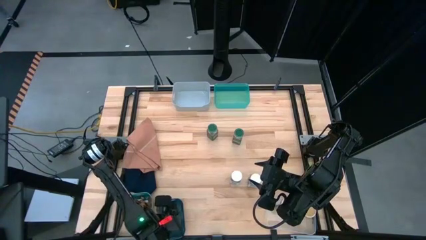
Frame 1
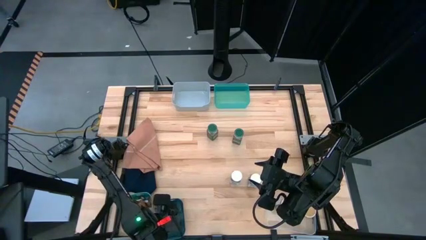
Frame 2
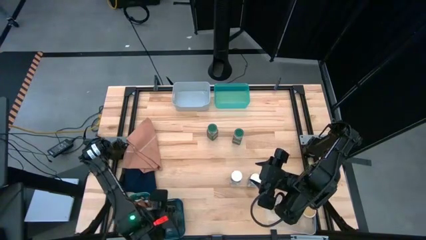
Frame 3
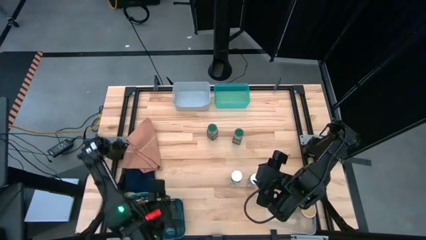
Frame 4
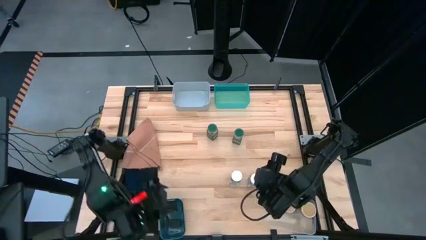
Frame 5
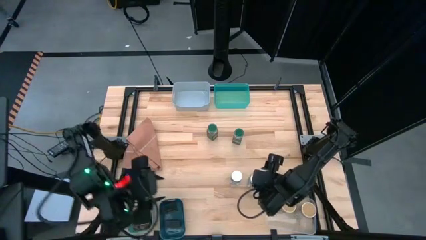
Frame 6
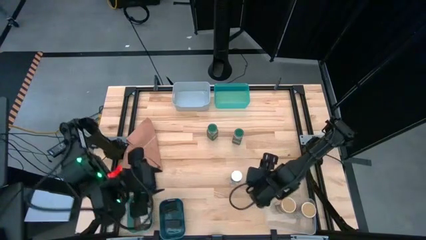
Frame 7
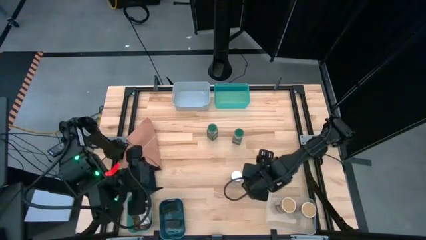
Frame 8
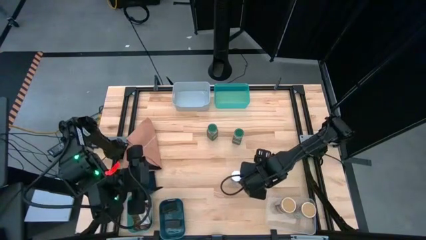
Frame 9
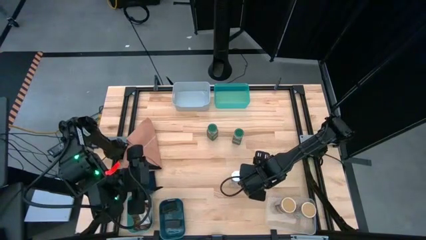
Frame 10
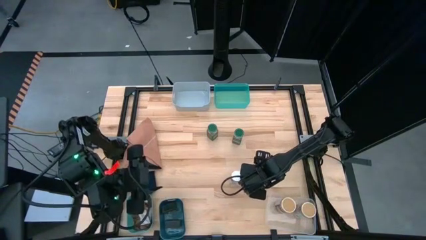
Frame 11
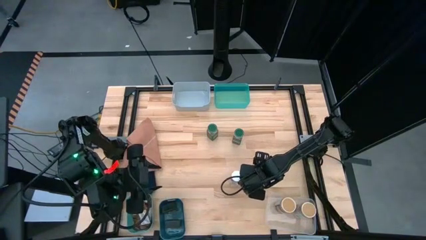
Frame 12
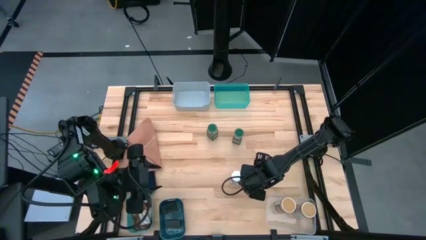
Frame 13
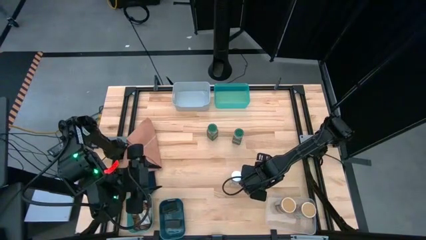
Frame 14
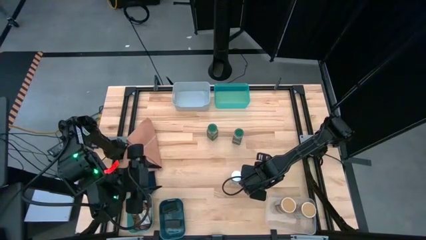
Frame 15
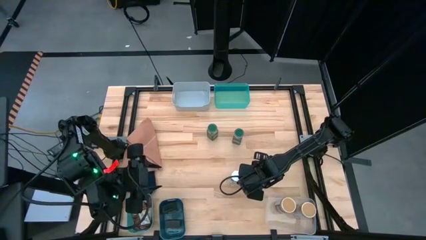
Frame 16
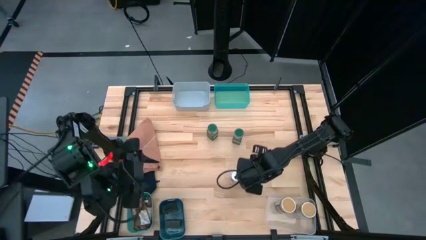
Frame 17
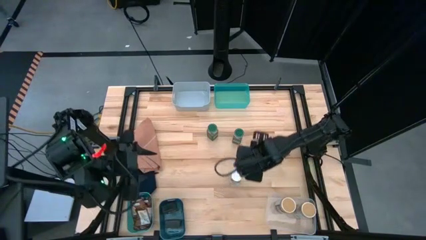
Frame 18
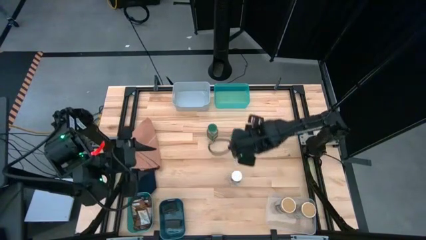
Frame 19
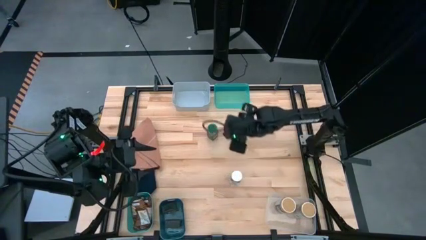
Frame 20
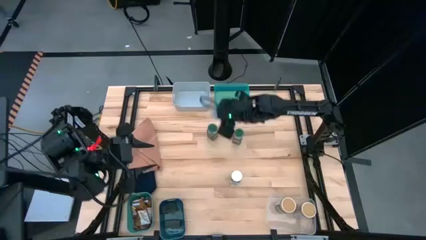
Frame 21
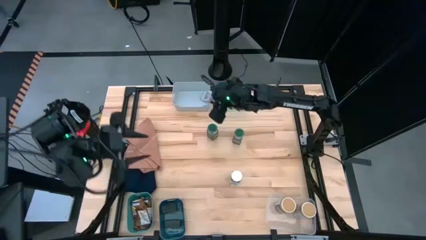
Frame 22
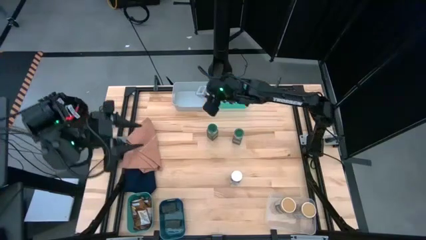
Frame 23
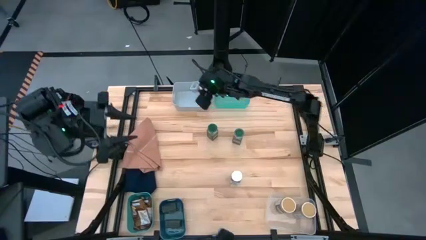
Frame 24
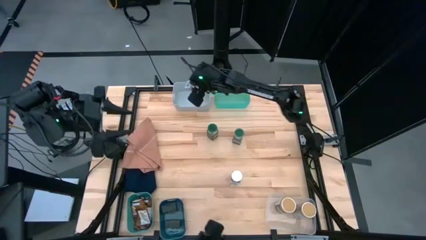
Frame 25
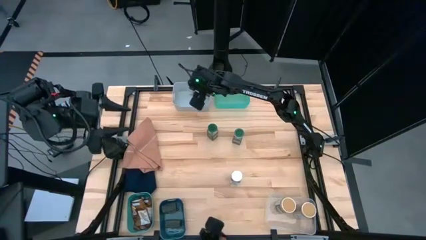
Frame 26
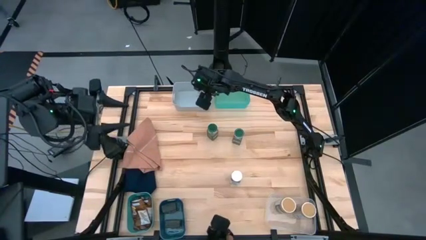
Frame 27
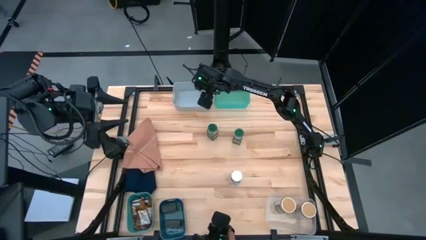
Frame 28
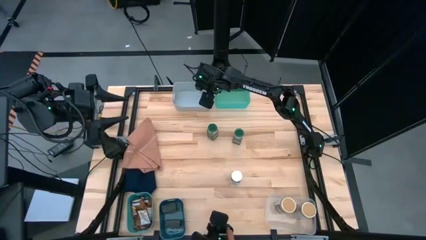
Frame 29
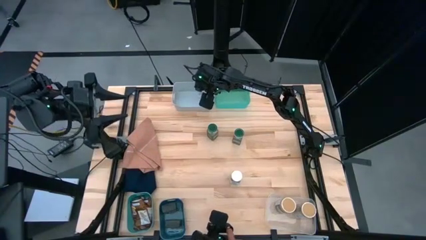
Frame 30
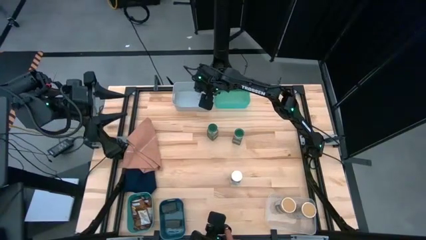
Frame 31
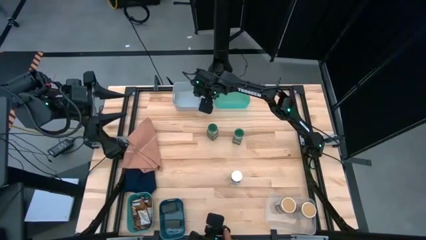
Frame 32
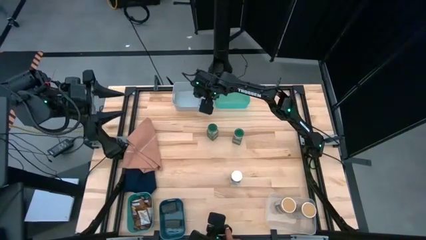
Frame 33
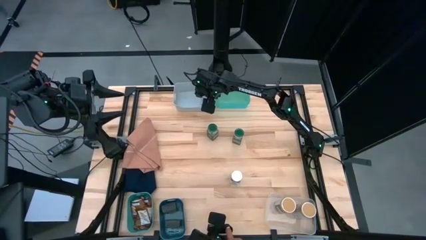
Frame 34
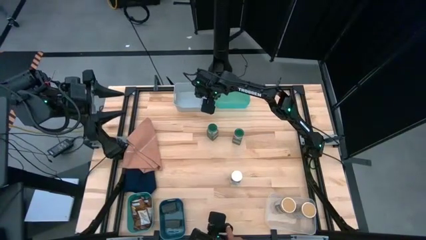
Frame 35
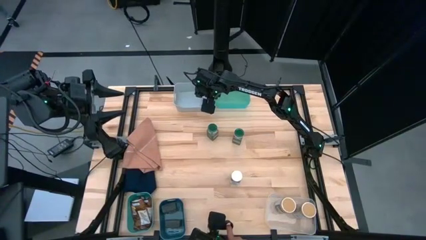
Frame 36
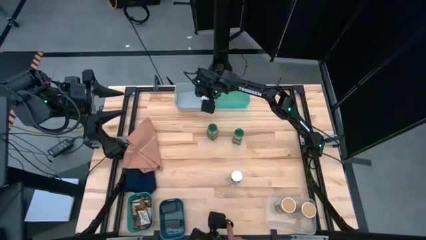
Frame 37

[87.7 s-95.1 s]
Task: Sort spices by type
Put the right white spice bottle into the gray bin

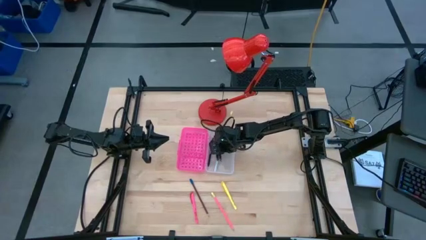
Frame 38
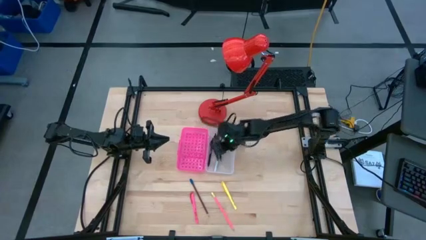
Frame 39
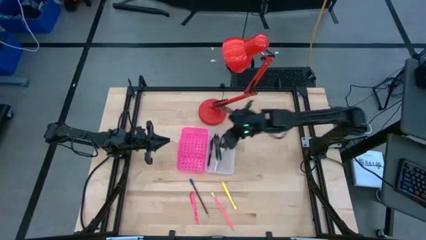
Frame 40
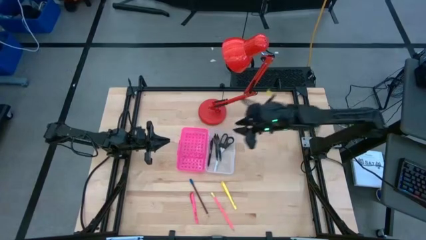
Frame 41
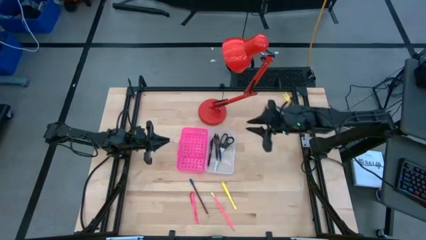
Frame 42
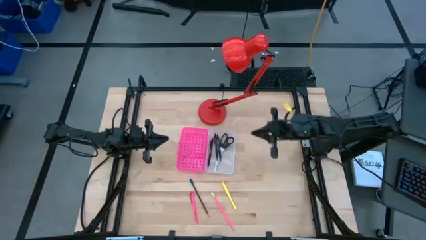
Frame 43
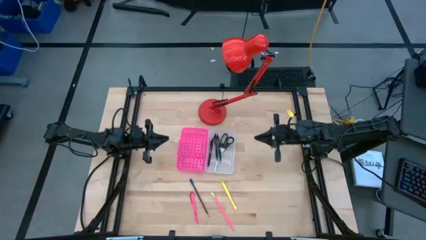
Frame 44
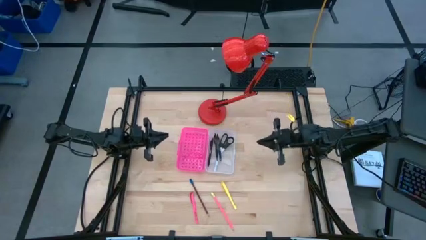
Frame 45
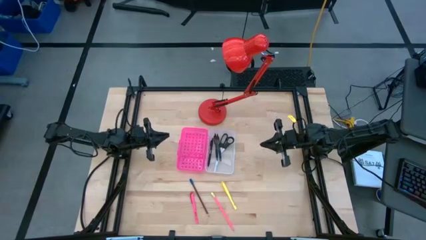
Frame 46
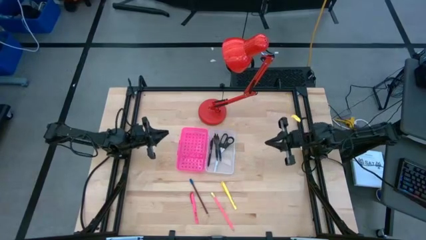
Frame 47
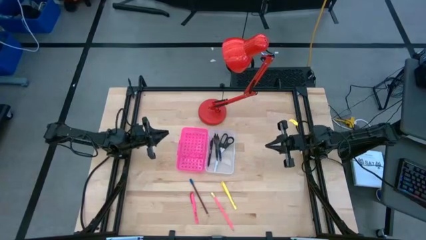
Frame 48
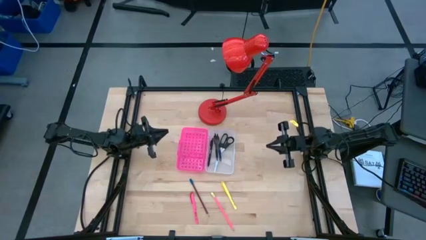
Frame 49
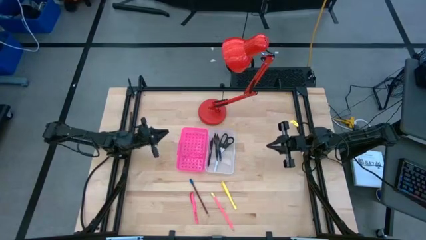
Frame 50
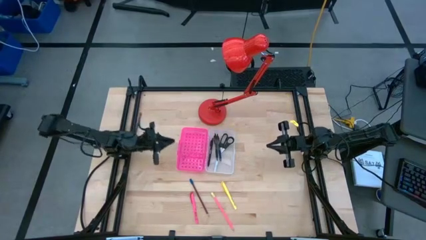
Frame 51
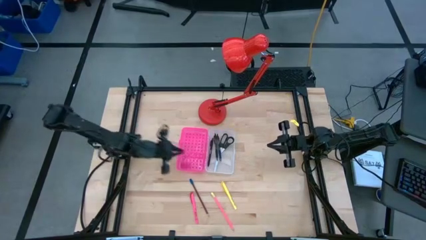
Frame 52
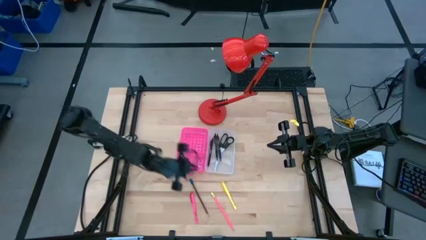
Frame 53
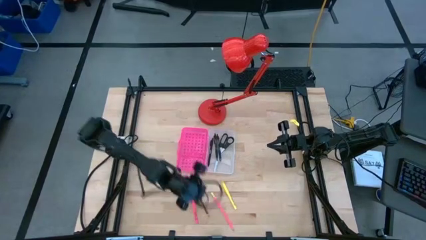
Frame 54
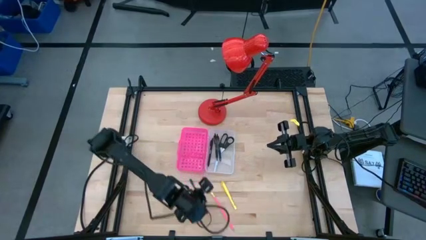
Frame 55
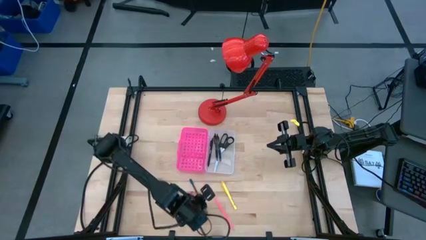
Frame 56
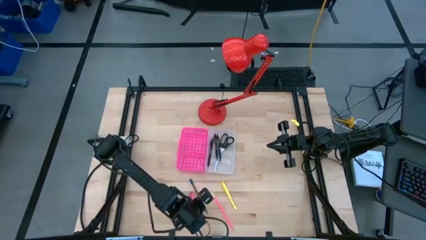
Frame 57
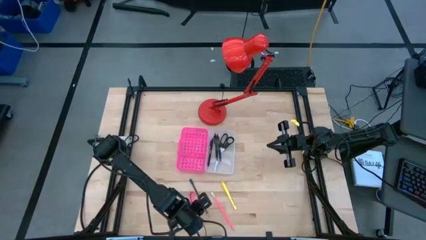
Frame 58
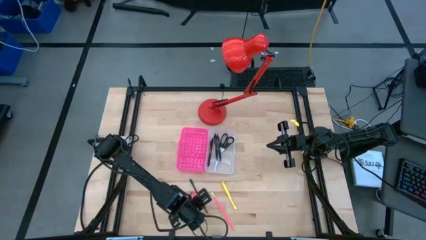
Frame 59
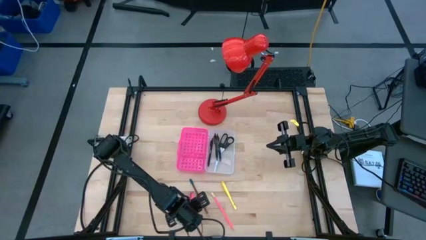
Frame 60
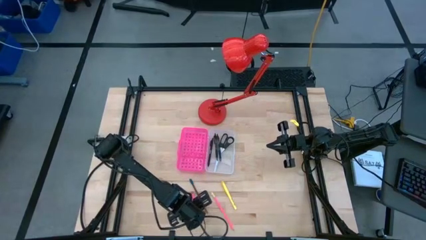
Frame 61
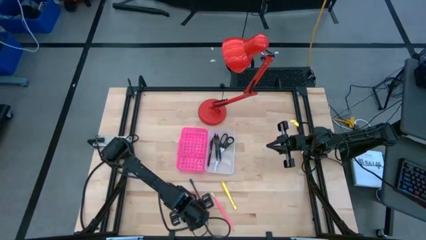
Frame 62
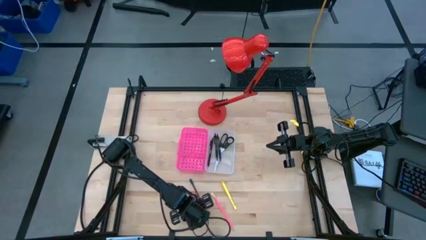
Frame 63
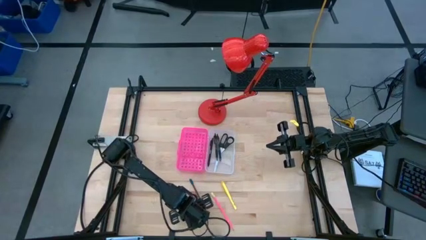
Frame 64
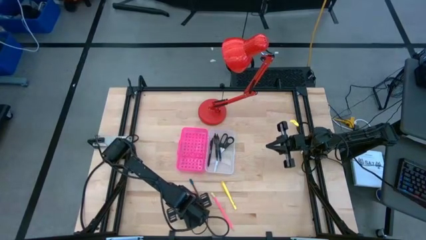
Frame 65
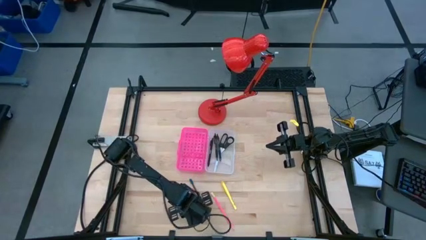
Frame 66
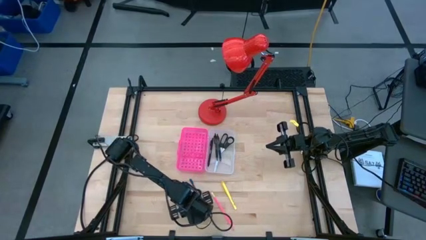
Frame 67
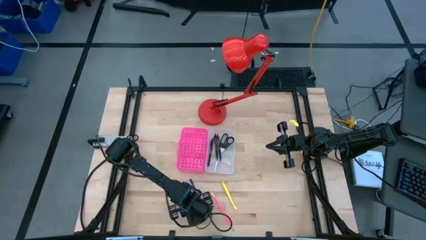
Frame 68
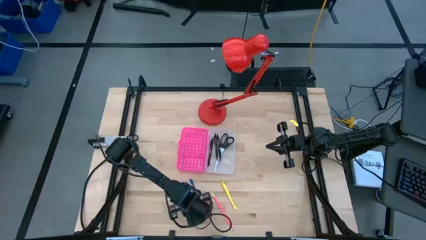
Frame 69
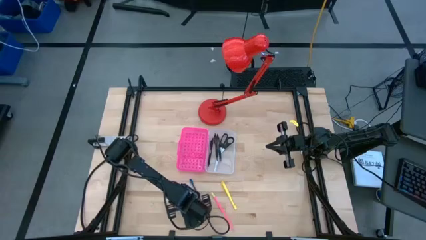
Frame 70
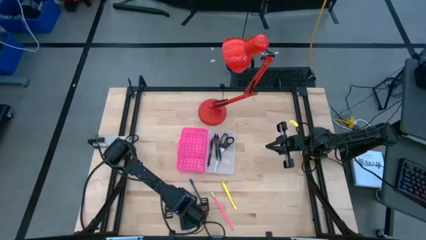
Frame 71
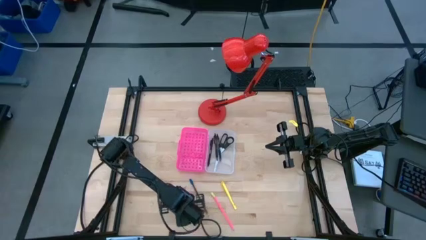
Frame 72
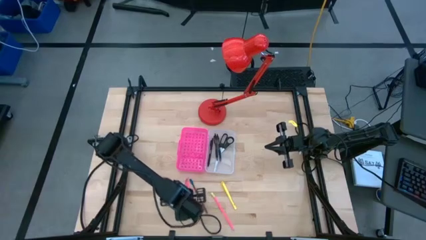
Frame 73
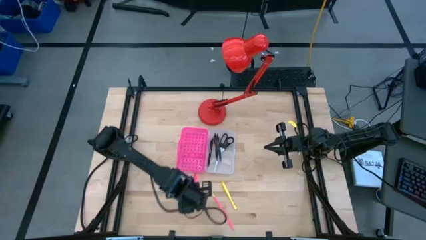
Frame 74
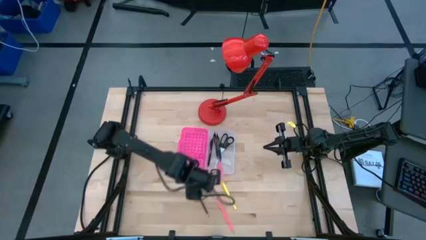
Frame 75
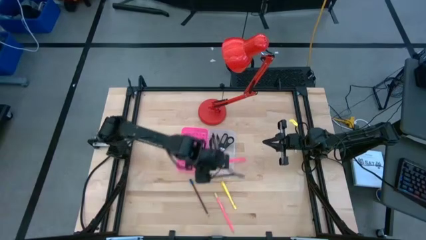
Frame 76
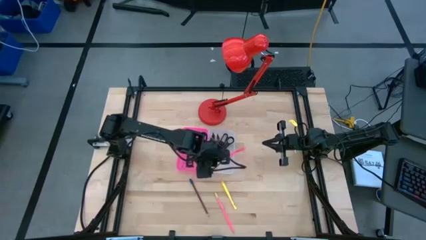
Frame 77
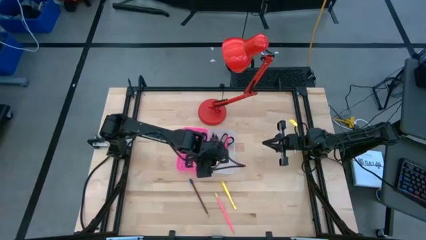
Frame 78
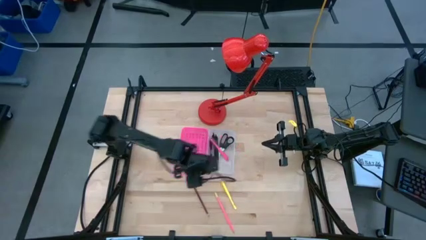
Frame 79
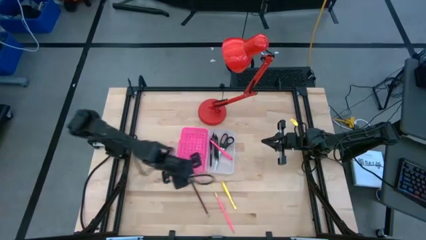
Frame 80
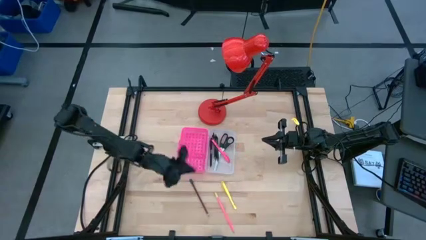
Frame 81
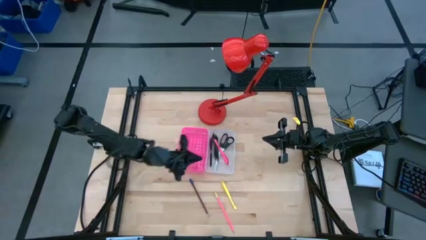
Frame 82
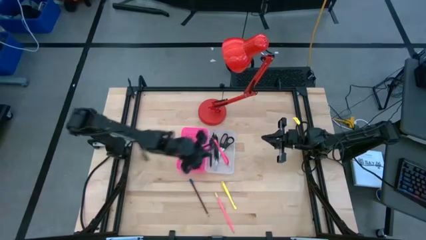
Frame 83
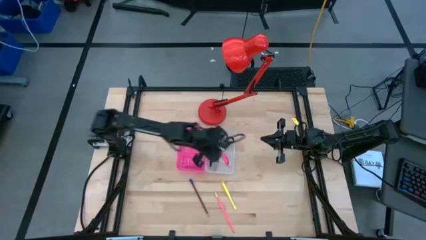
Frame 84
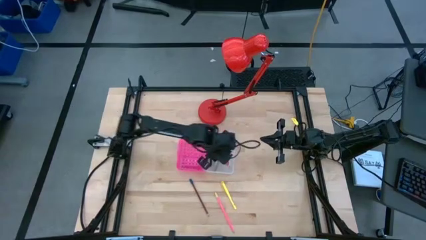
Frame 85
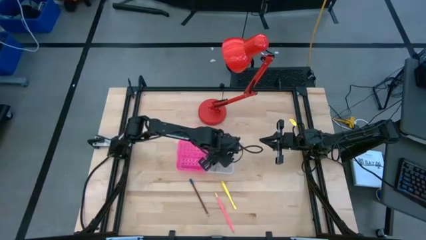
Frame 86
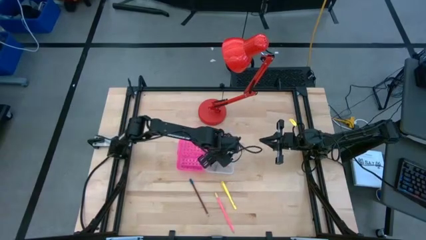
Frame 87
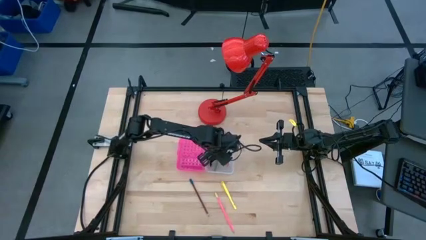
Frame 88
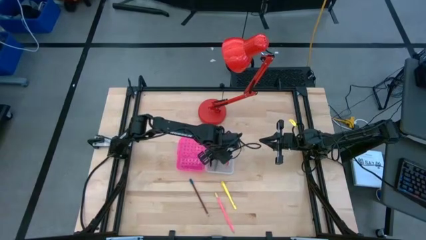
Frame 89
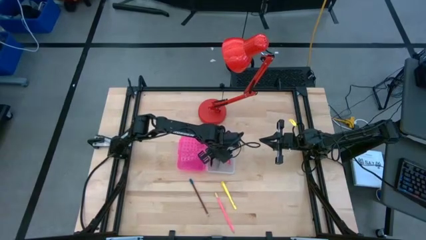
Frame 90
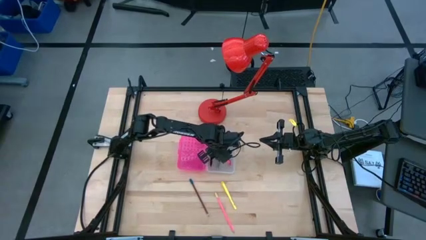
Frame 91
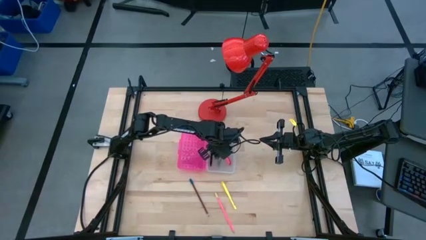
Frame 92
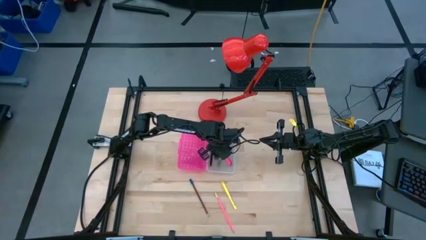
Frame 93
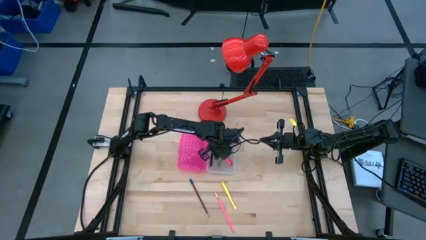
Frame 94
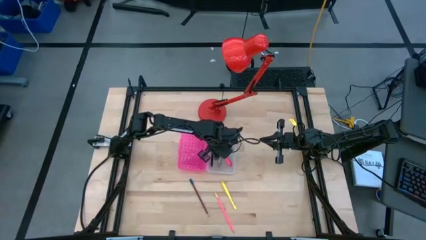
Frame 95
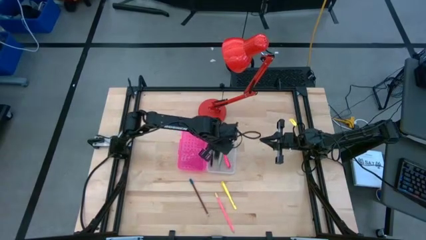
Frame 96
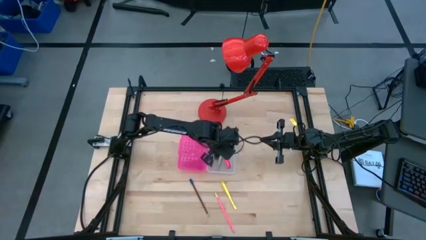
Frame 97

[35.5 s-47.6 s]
Task: Pick & place school supplies into a supply box
Put the pink pen into the supply box
